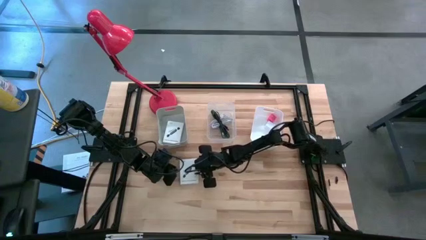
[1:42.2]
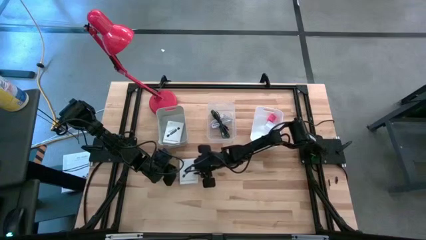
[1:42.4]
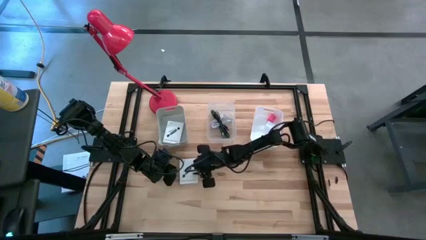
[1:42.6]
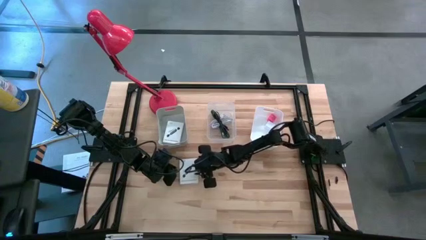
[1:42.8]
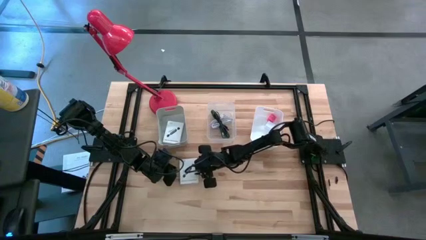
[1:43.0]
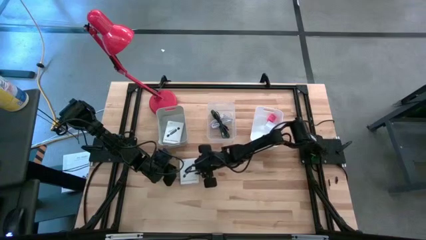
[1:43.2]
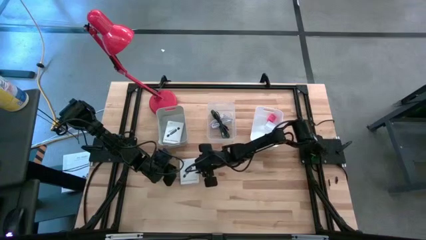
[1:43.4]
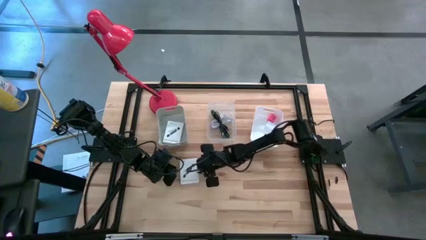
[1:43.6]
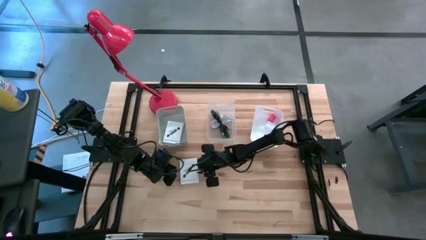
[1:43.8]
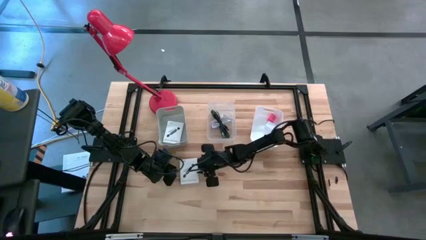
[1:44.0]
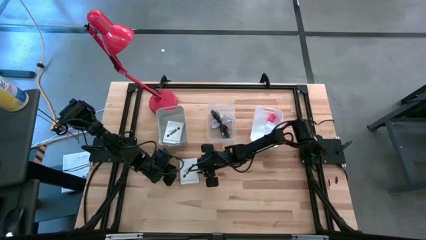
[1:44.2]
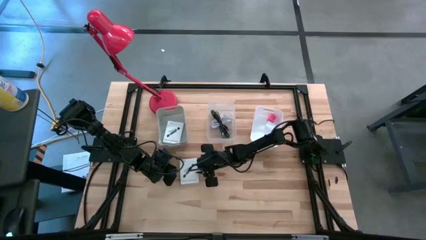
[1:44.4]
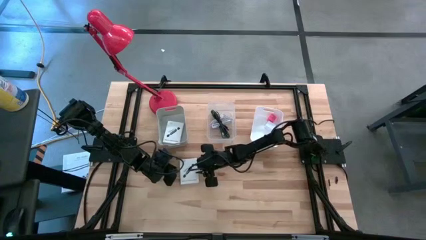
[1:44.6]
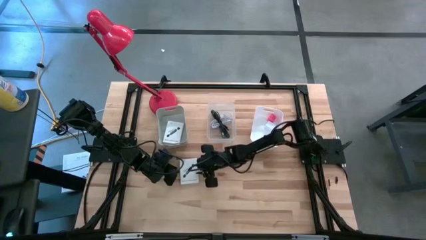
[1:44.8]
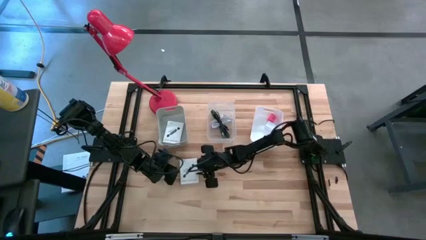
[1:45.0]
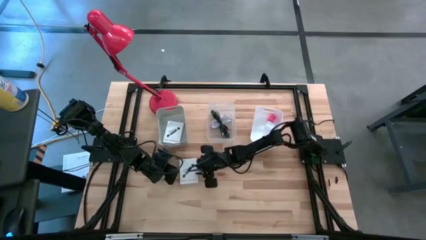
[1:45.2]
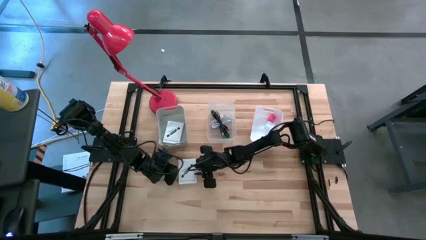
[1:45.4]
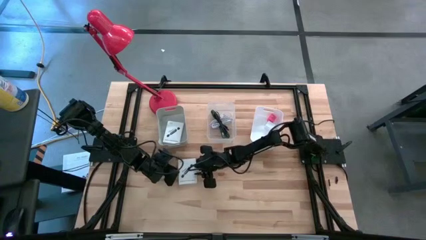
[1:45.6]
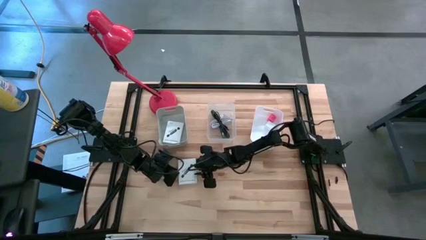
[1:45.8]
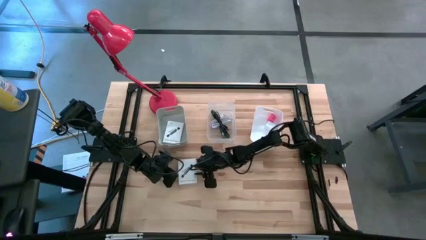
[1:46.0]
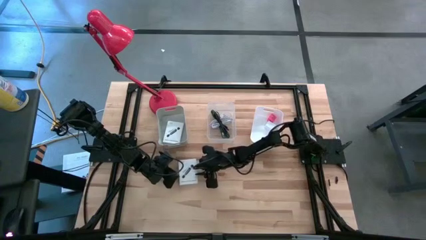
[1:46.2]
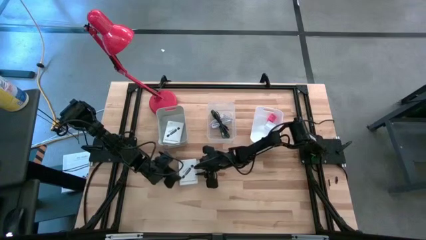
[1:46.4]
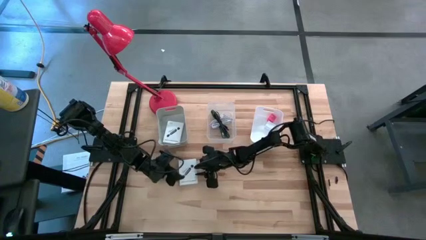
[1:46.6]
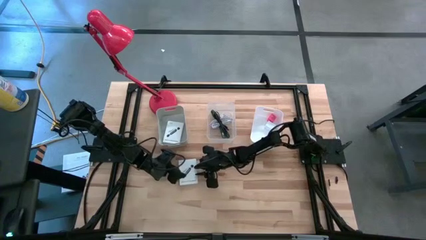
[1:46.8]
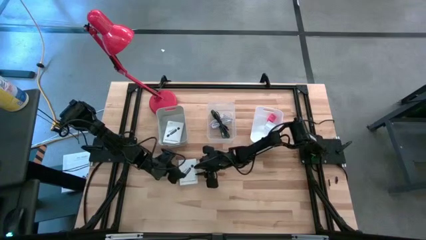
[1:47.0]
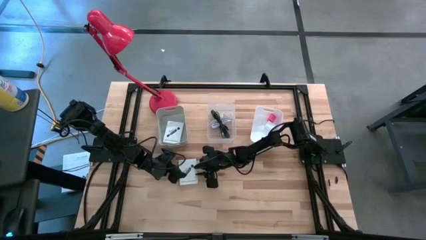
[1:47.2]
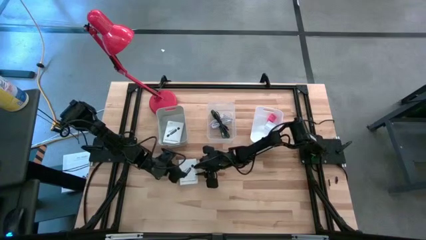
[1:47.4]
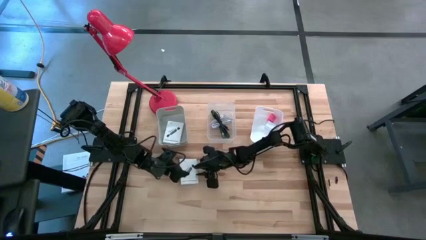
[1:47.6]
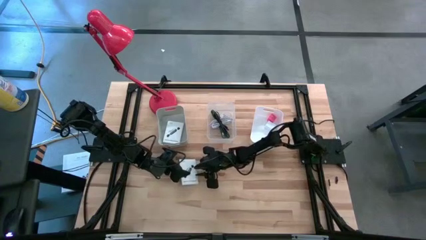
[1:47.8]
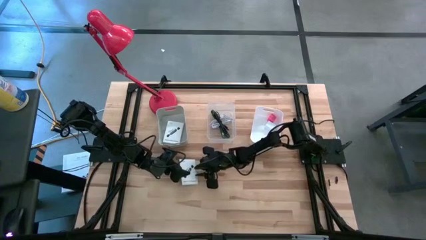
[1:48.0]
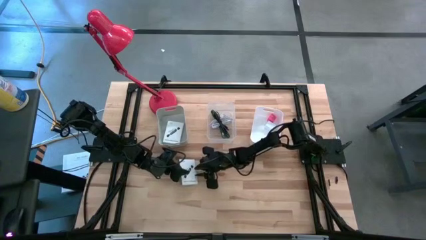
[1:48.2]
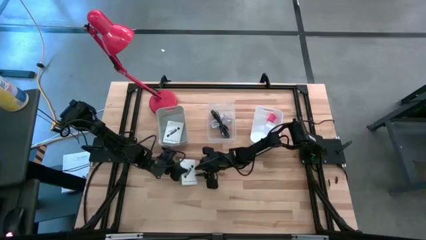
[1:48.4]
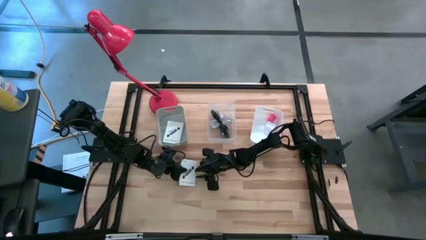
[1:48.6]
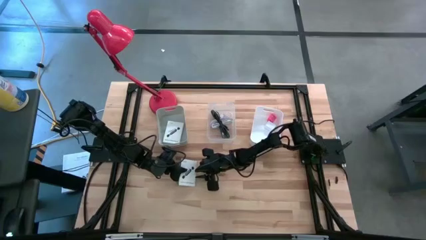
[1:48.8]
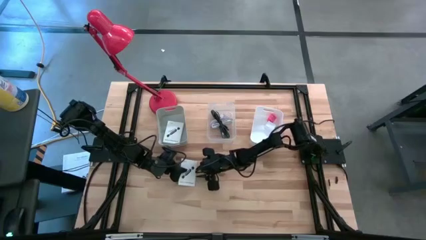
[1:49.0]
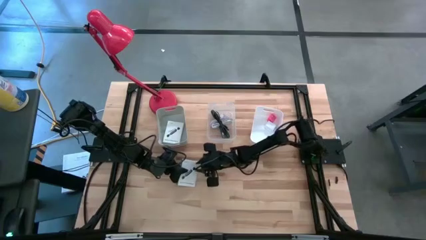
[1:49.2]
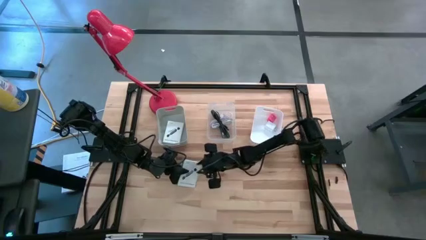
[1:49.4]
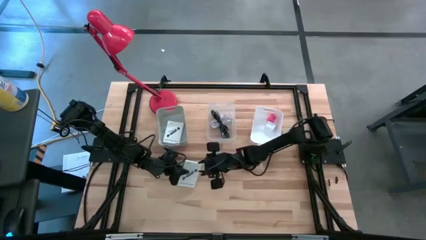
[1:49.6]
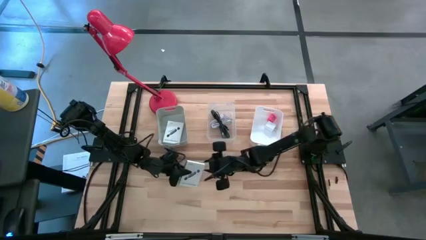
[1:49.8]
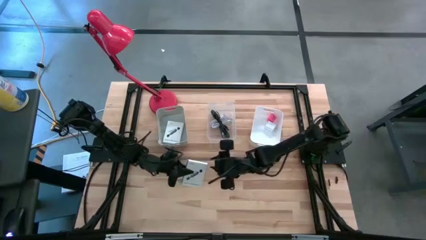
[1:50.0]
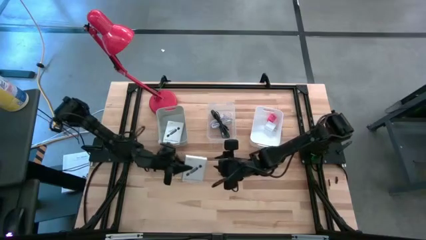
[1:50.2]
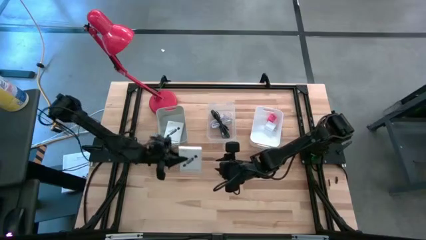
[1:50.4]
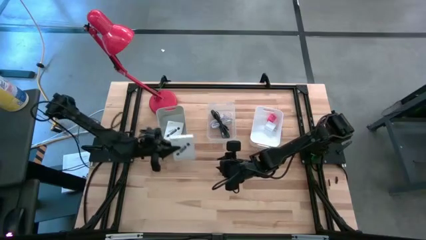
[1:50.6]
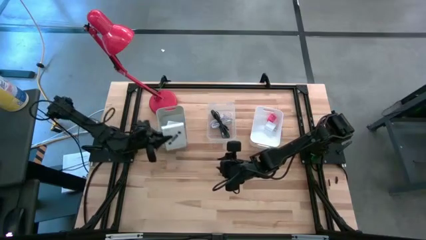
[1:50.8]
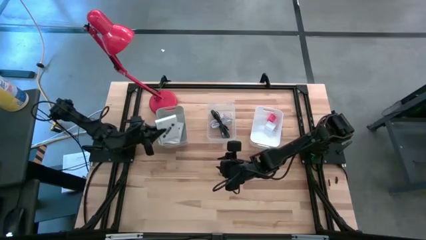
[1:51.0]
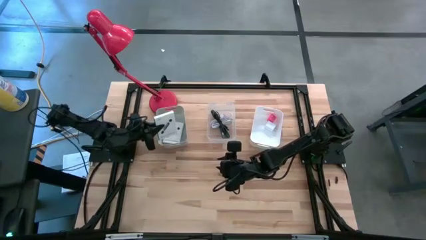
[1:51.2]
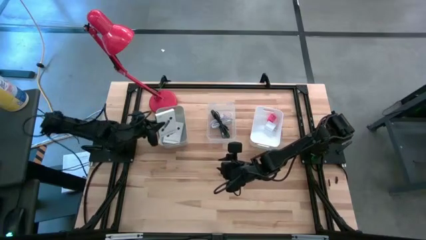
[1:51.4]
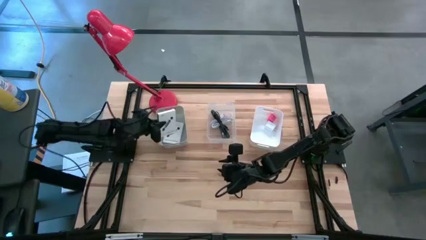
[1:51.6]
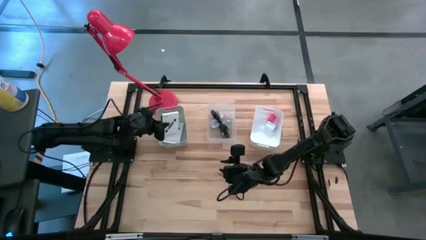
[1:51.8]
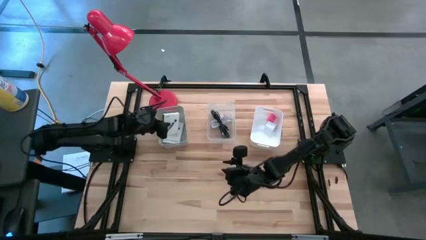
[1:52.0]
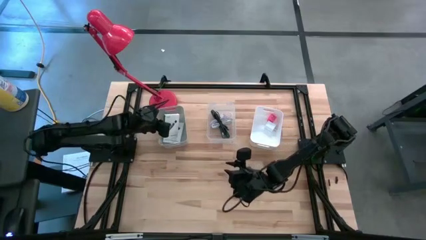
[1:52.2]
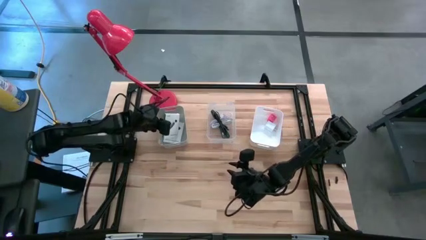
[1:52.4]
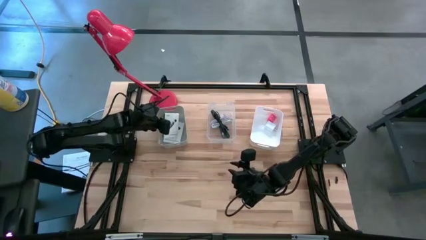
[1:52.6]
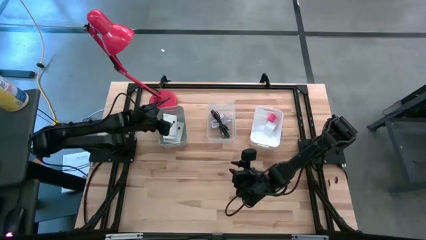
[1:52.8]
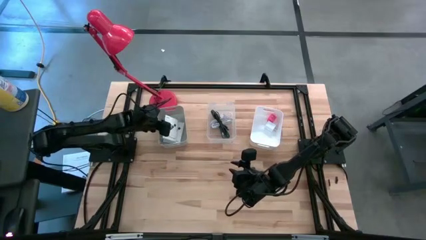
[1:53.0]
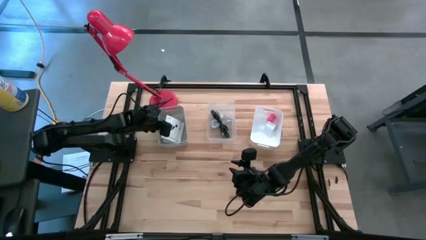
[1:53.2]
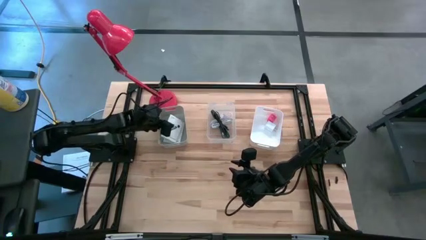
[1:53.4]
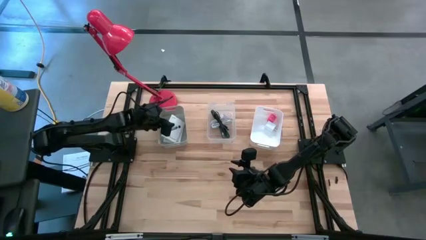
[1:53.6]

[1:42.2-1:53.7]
Task: Pick and place items into bin
Put the white card reader box into the gray bin

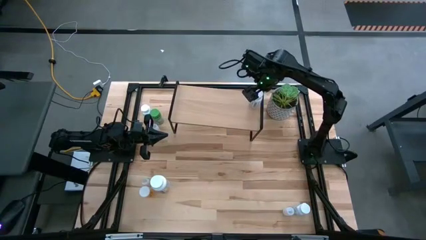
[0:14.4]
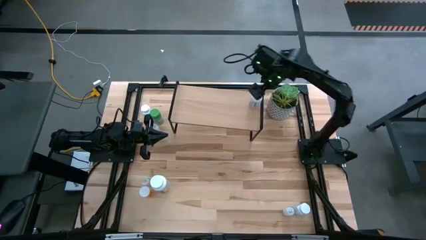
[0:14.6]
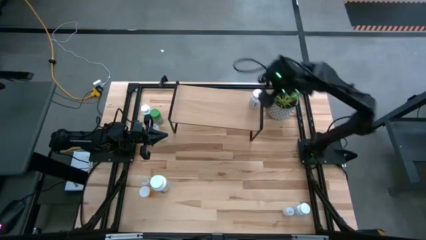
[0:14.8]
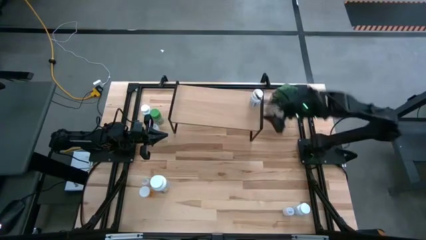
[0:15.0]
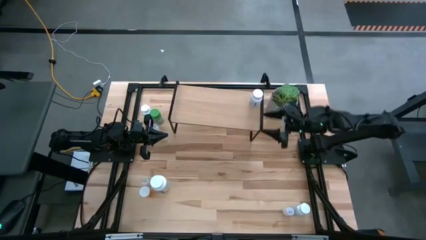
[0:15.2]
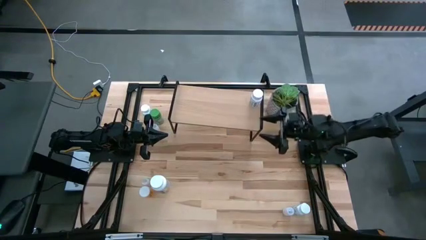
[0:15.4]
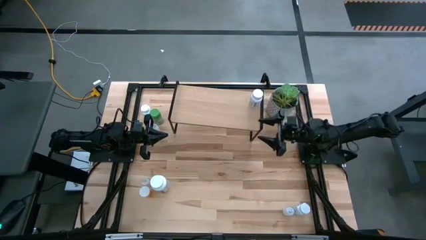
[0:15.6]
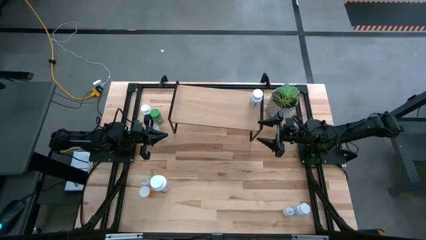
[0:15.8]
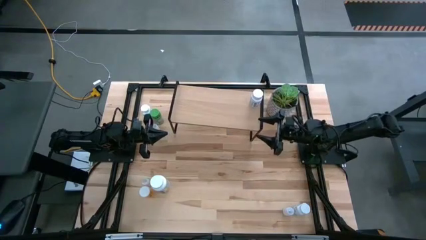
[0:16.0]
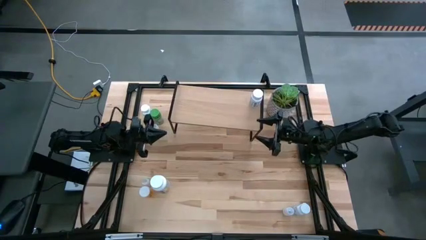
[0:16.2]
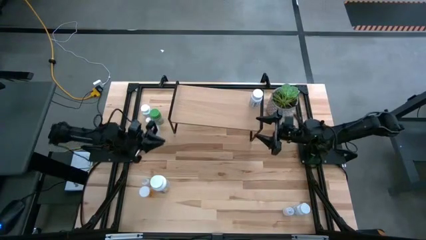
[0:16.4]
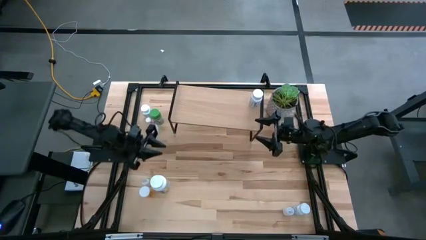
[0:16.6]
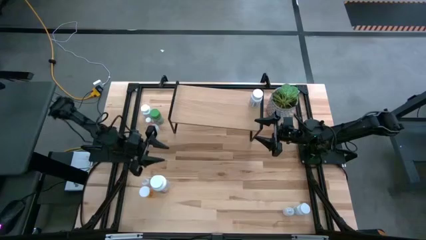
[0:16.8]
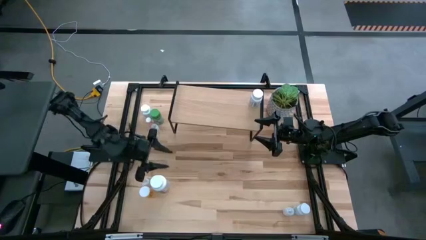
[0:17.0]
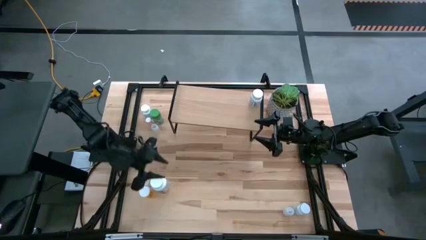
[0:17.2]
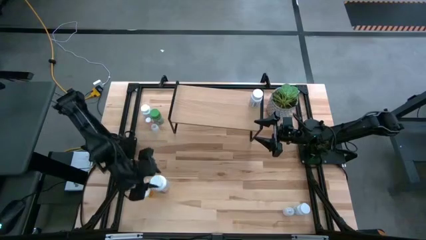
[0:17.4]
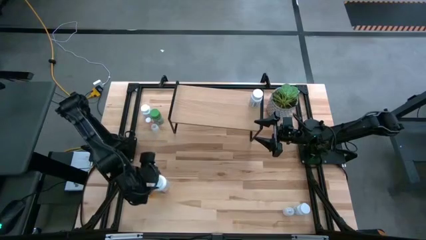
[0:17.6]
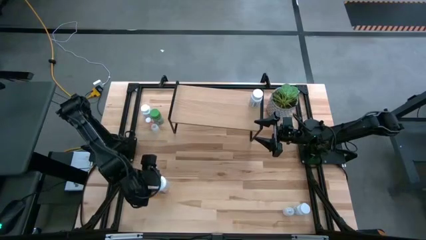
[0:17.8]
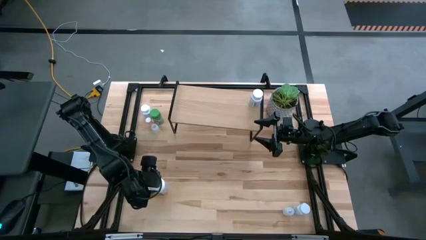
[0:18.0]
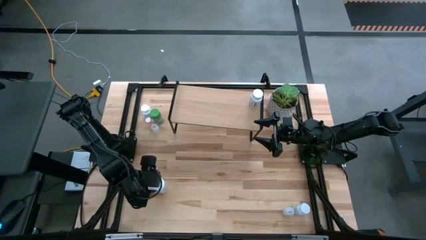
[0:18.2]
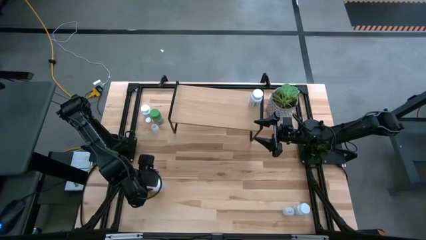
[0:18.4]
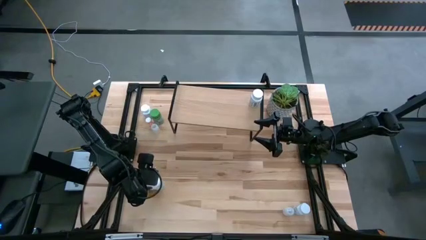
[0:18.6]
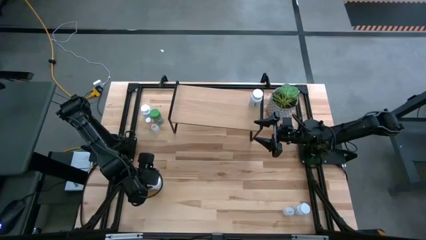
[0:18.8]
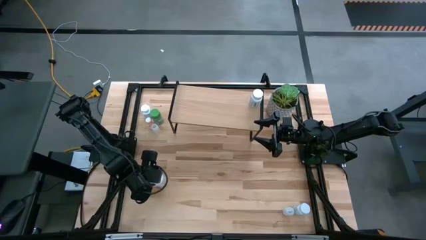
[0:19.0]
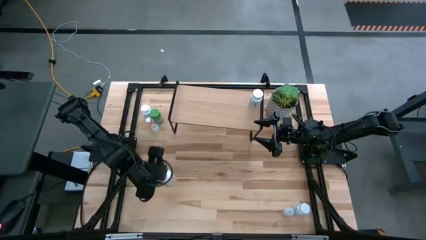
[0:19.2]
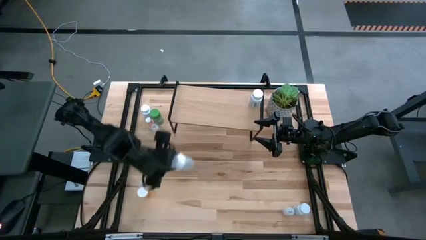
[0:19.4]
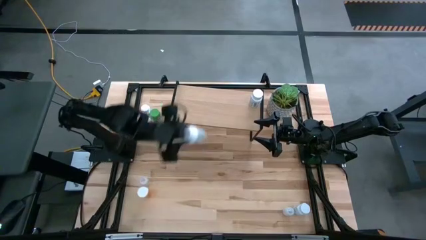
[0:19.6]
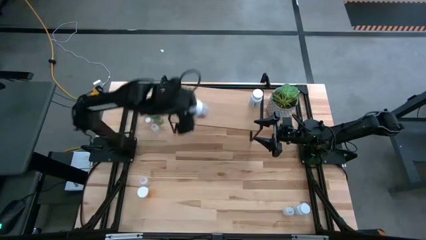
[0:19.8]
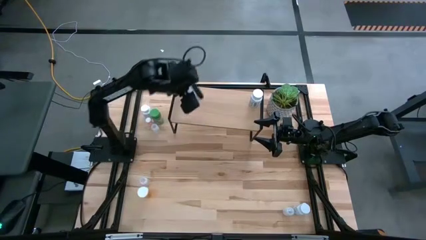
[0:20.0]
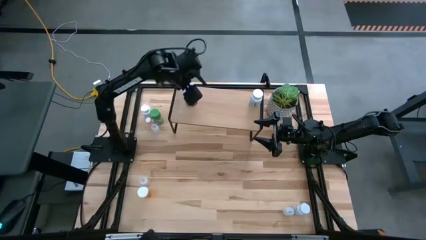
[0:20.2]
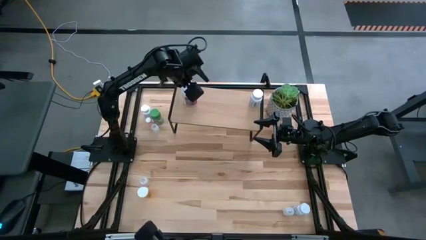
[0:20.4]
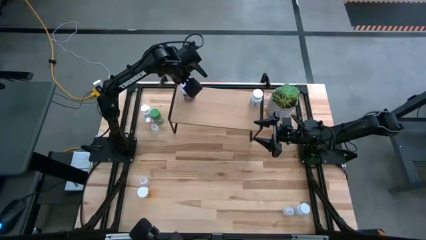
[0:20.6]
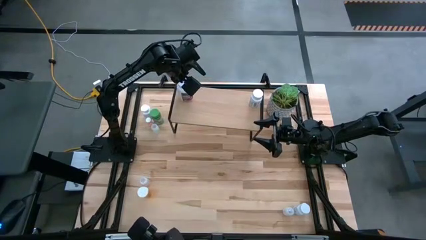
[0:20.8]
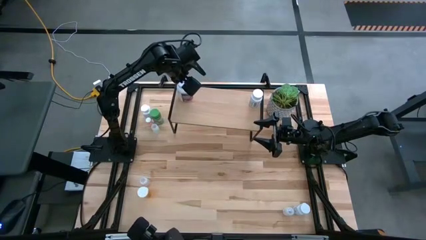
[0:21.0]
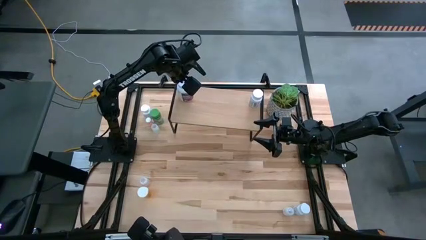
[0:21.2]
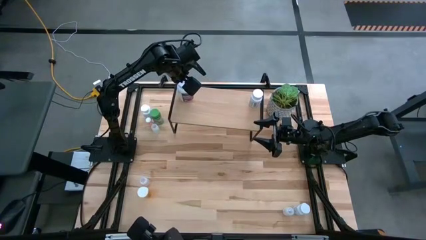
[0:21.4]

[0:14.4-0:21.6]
Task: Pick and place medicine bottles onto shelf by color
Put the white medicine bottle on the shelf
